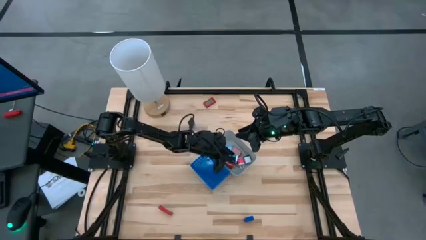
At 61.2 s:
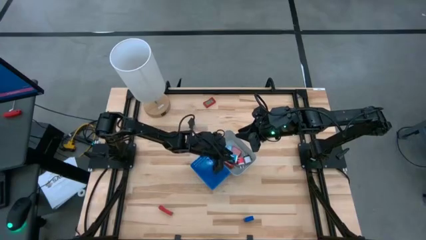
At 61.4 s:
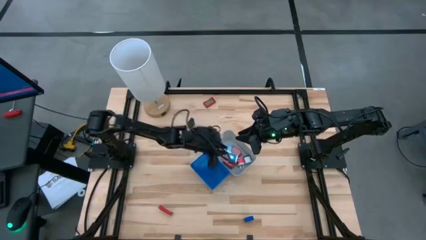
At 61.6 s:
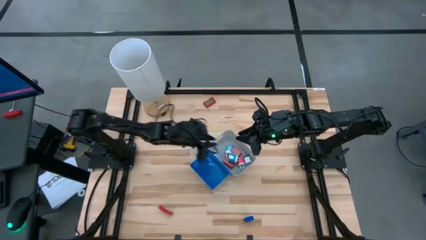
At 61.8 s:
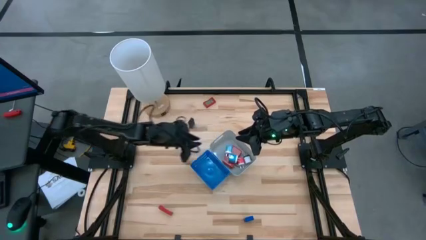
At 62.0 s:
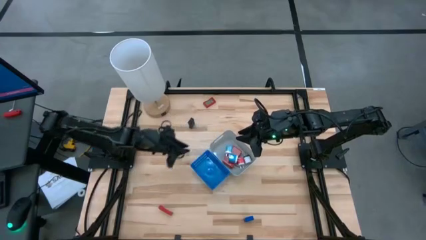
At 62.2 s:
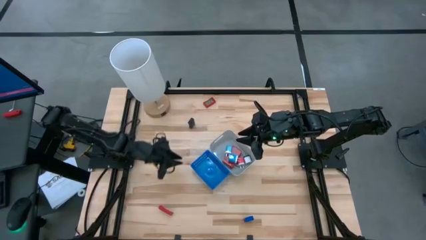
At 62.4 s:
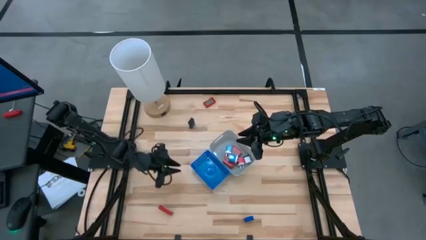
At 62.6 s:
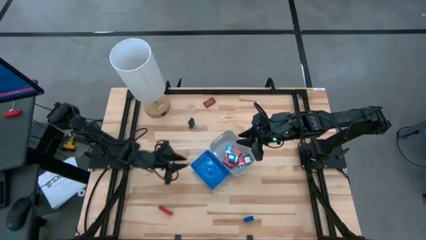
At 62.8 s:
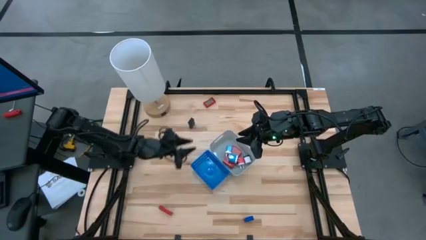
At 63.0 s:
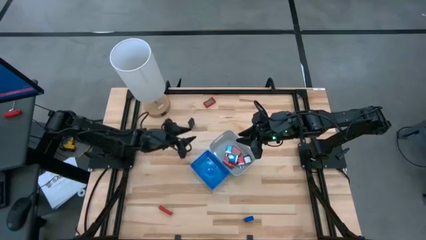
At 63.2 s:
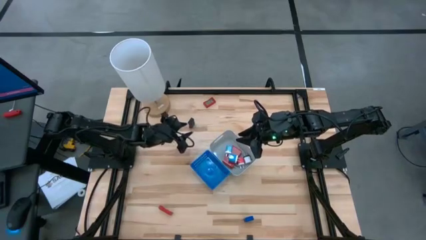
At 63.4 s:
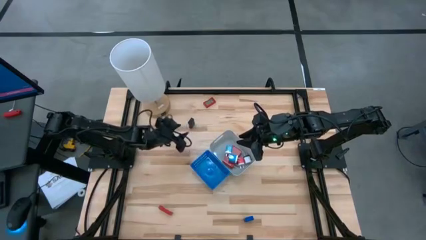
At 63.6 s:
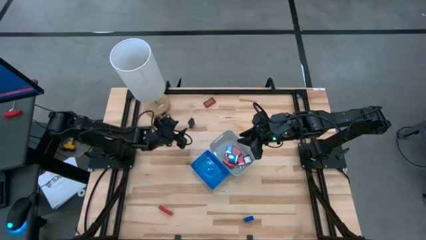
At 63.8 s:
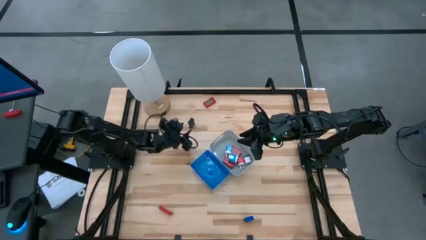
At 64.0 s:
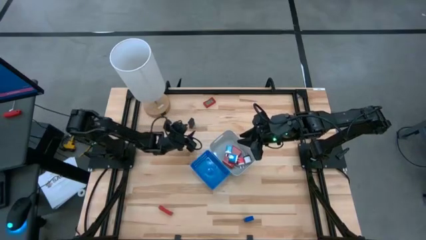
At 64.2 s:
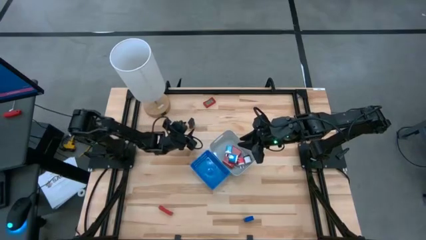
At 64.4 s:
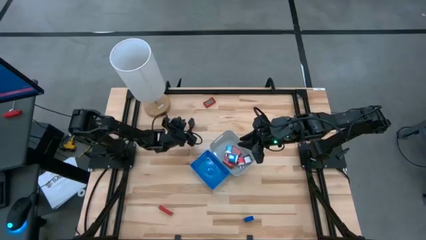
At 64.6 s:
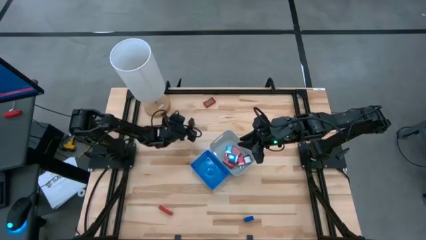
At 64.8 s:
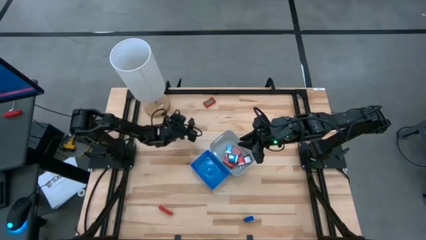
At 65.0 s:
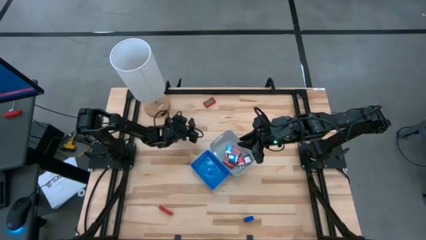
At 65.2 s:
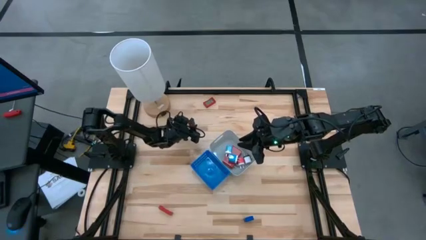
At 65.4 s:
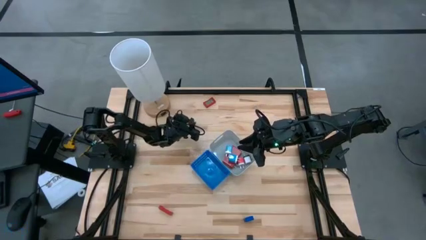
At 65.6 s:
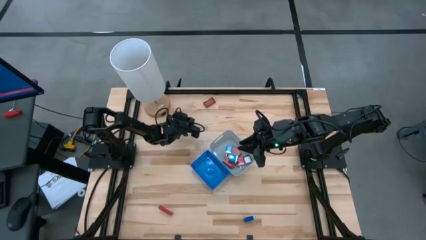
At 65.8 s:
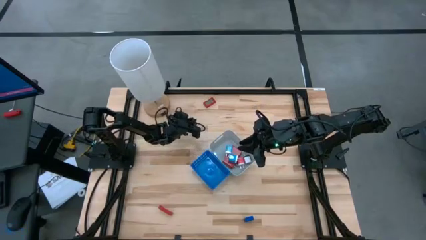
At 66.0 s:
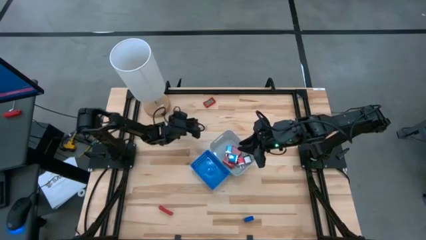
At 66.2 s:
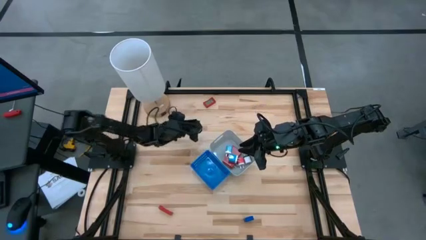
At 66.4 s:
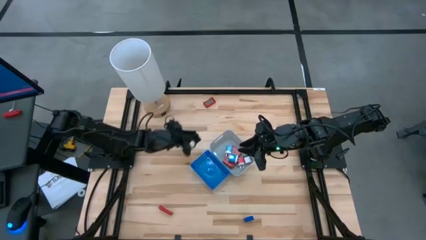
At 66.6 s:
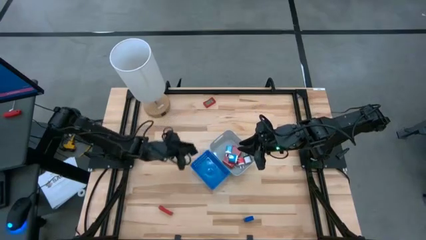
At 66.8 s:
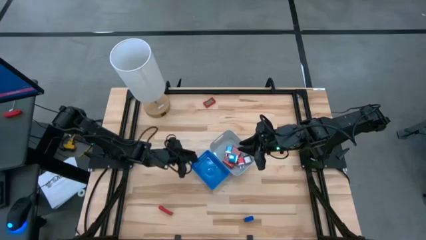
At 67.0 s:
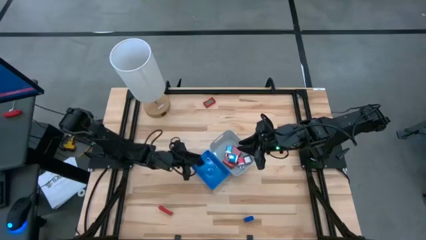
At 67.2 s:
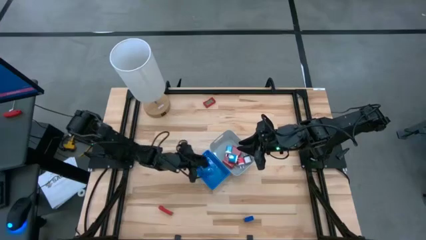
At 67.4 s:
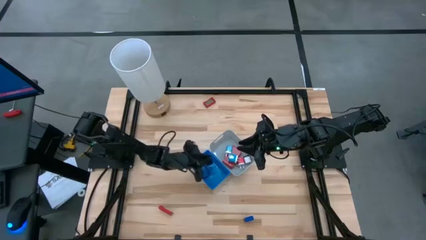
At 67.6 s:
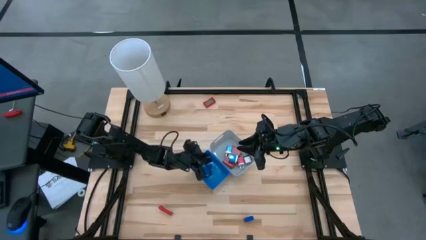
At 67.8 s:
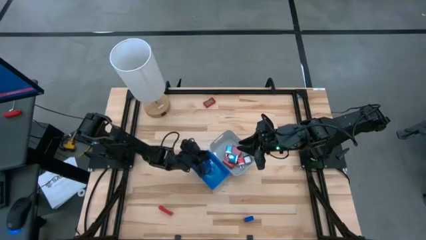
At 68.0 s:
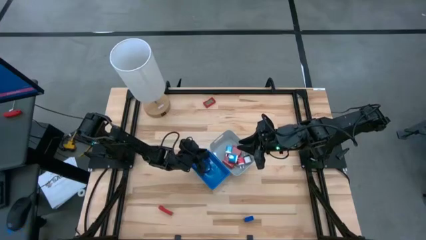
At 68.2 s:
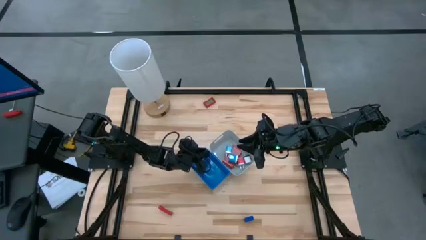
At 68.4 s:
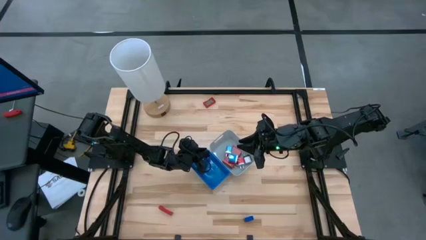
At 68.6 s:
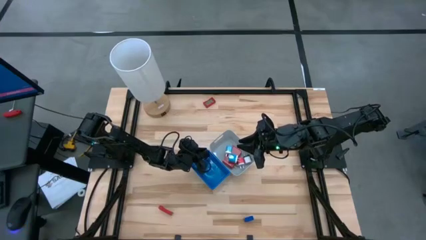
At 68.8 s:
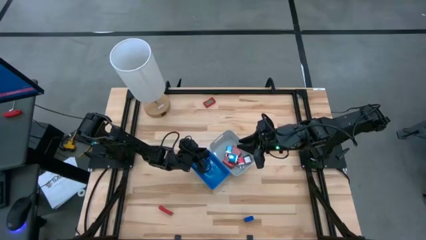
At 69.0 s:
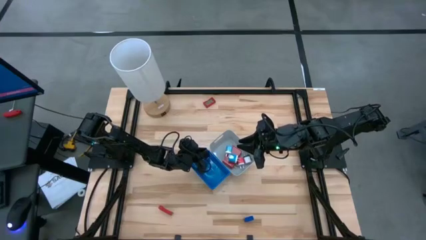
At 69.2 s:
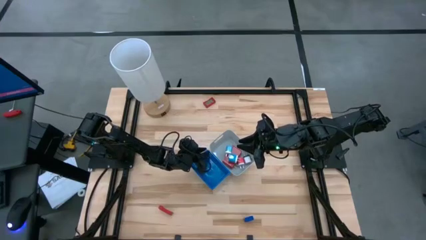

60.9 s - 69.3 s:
Task: Pick & Place Office items
Put the left black digital timer into the blue bin

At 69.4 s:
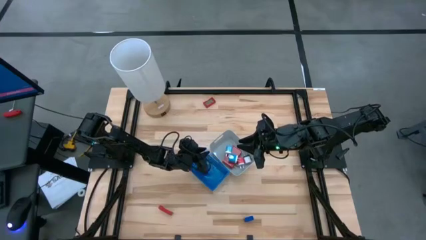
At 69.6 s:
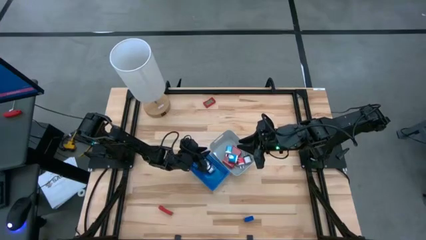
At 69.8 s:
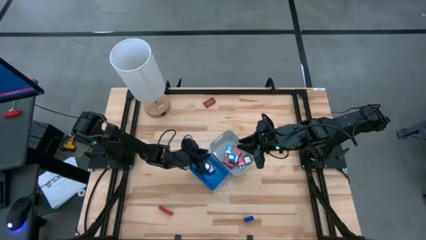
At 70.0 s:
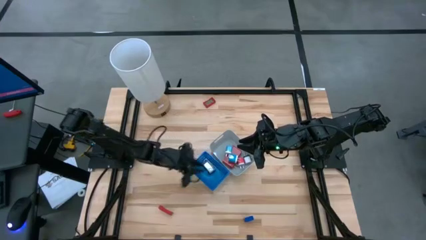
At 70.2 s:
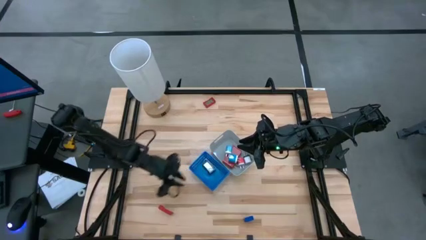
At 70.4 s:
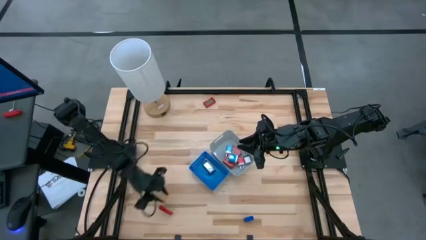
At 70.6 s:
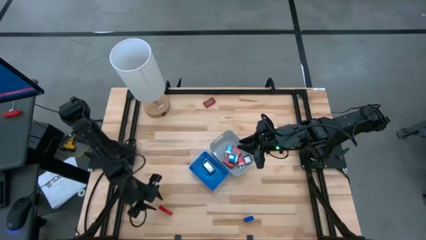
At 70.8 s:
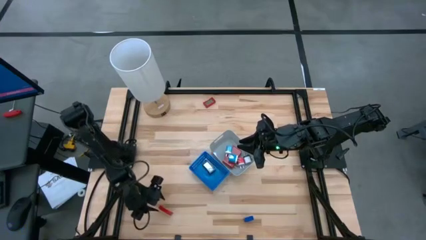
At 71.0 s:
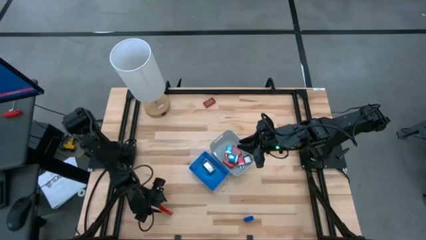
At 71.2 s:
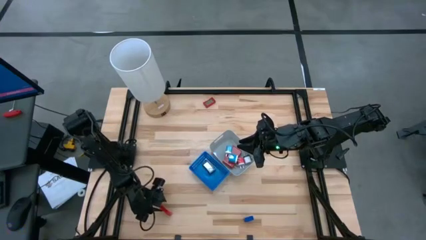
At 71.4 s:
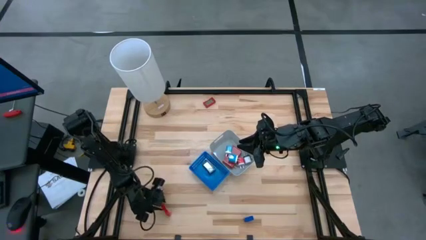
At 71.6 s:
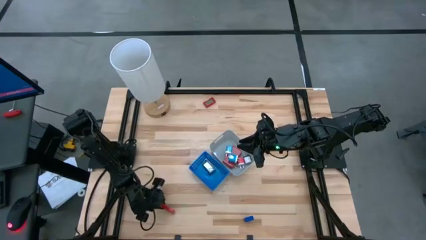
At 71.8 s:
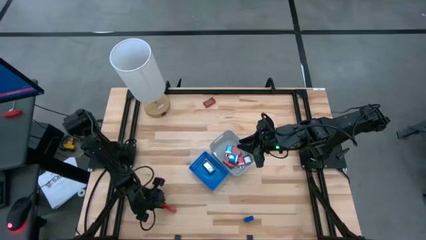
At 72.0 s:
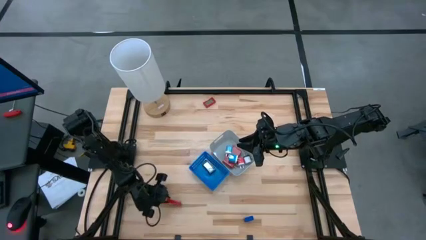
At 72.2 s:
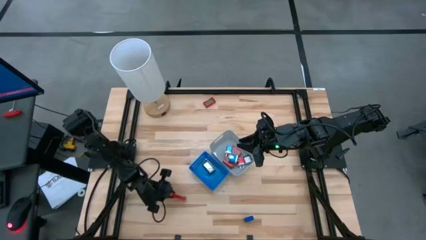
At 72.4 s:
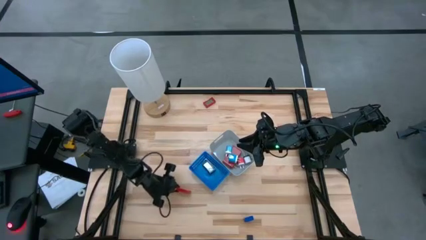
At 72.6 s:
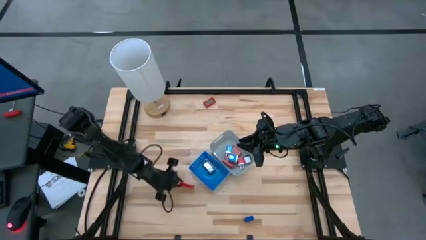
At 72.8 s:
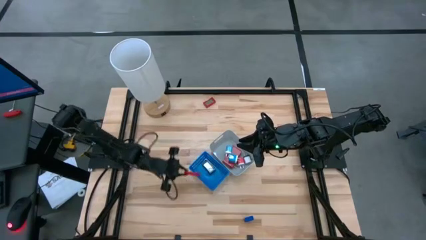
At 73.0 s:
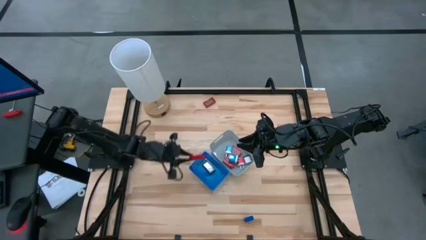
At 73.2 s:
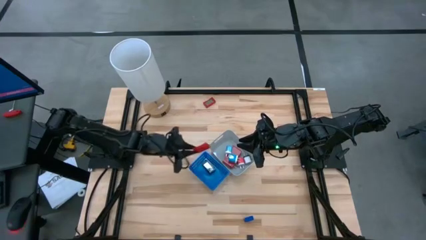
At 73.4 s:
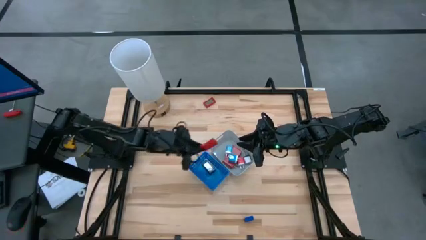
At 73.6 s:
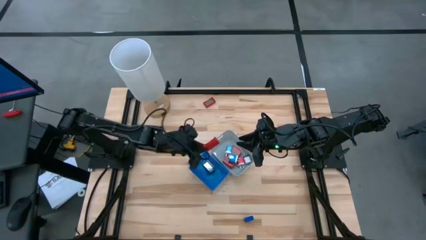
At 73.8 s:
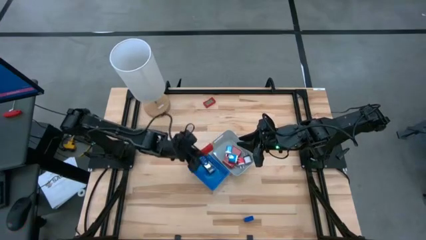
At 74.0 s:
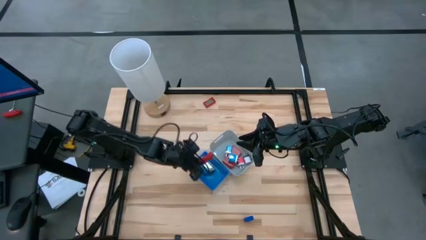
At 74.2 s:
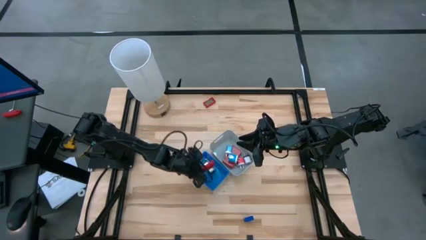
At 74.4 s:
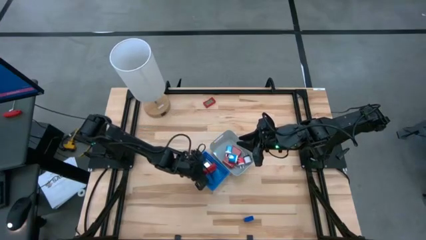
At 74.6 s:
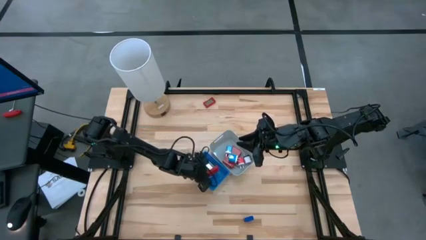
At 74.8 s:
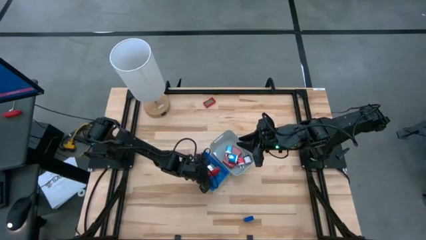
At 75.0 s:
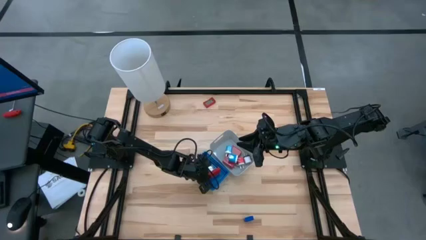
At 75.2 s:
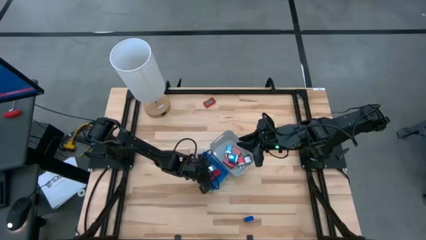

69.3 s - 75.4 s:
Put the bottom red digital timer into the blue bin
